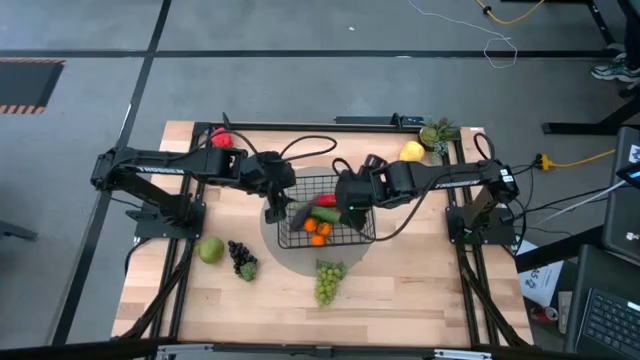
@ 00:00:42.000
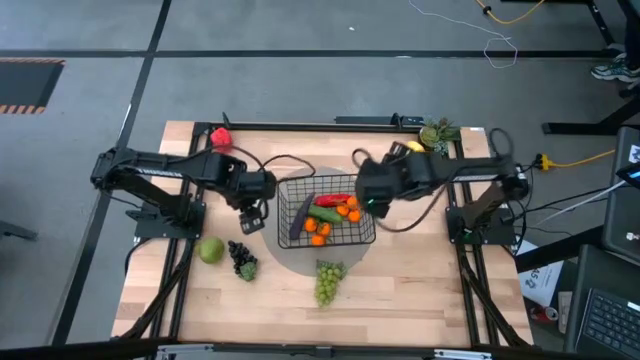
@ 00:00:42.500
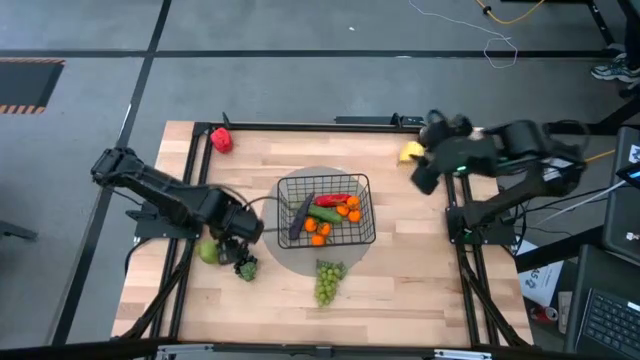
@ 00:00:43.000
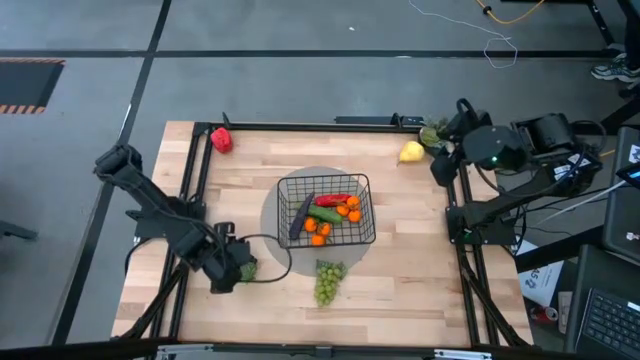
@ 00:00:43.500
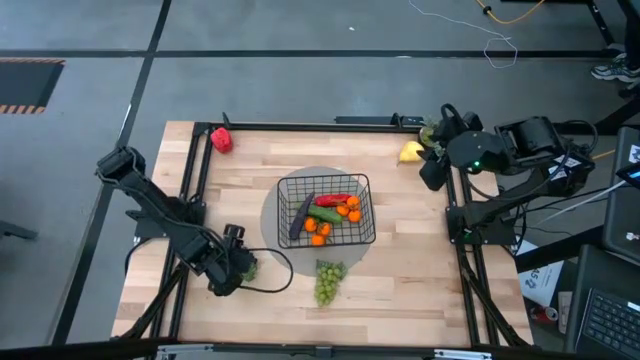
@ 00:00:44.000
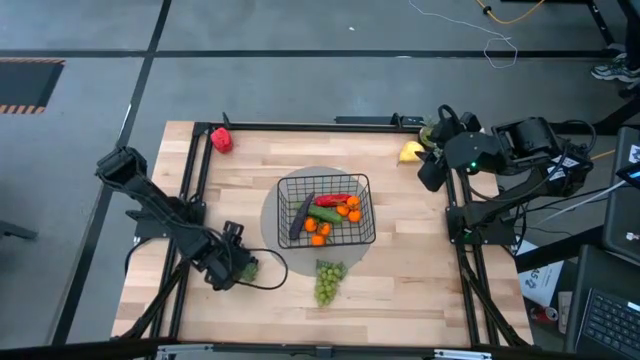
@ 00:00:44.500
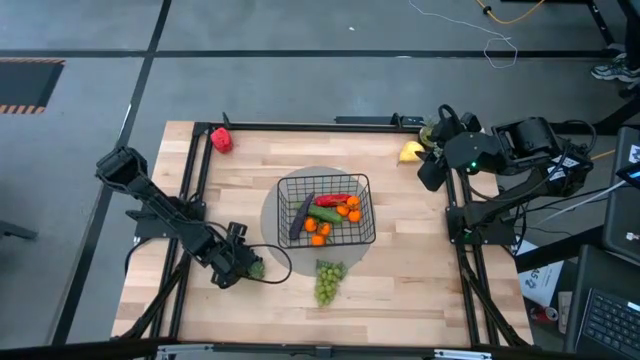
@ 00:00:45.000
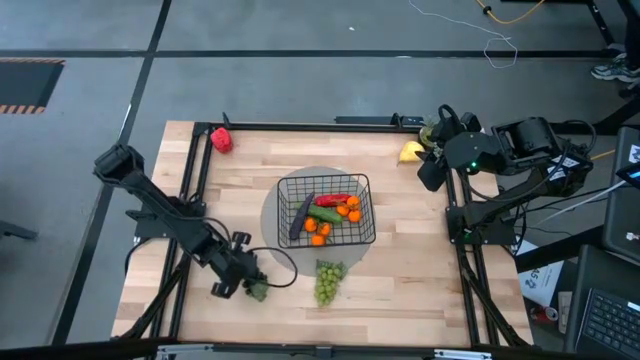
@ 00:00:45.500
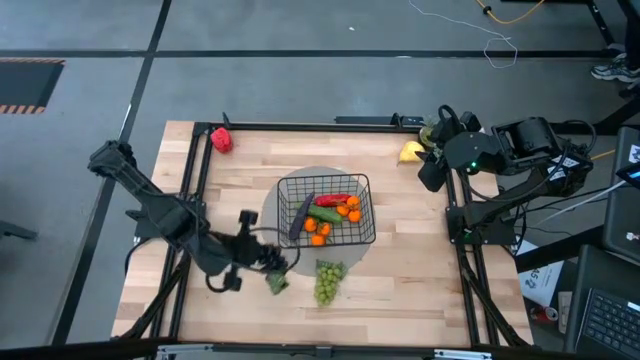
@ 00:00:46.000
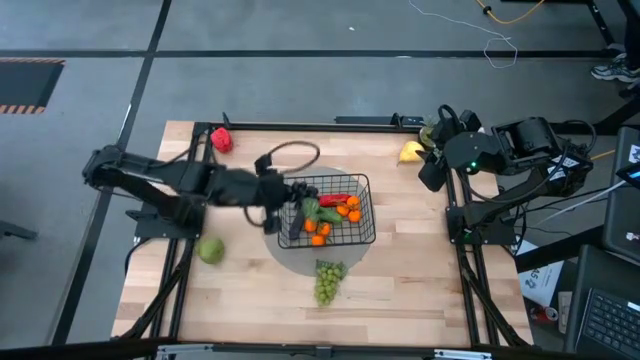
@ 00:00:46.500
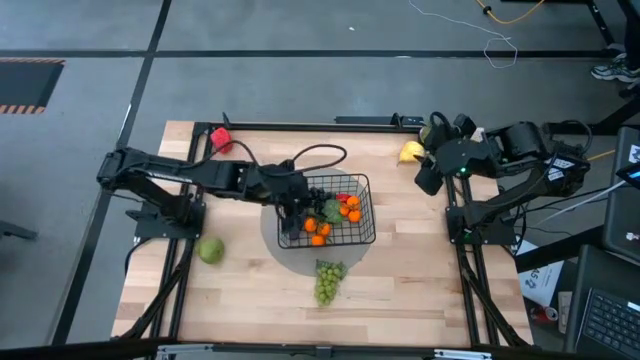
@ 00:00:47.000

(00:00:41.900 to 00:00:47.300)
Task: Build produce basket
Put the black grapes into the wire basket

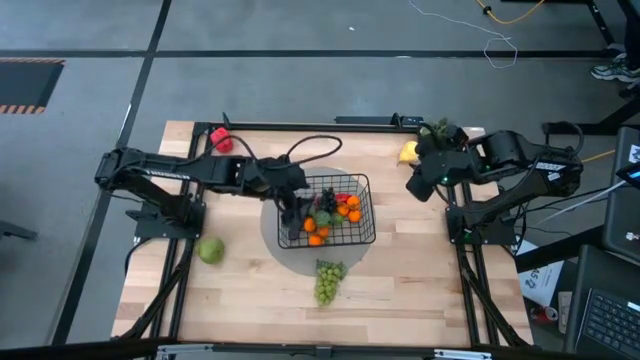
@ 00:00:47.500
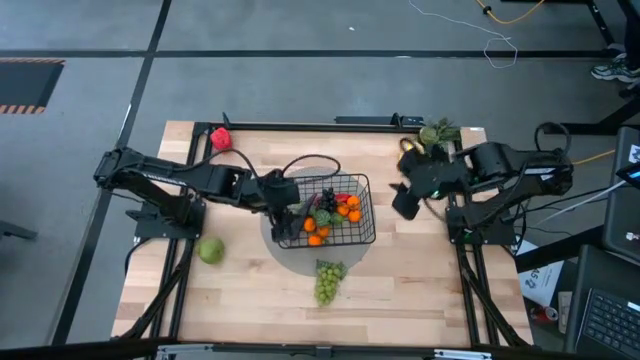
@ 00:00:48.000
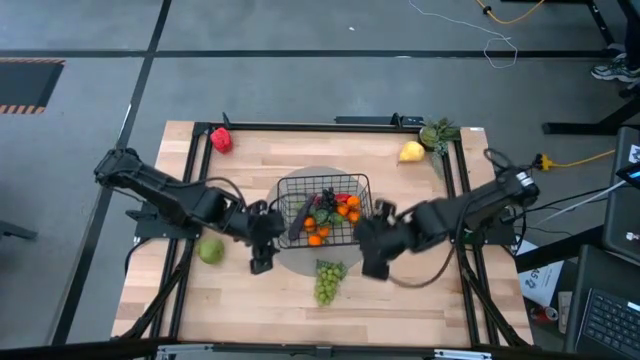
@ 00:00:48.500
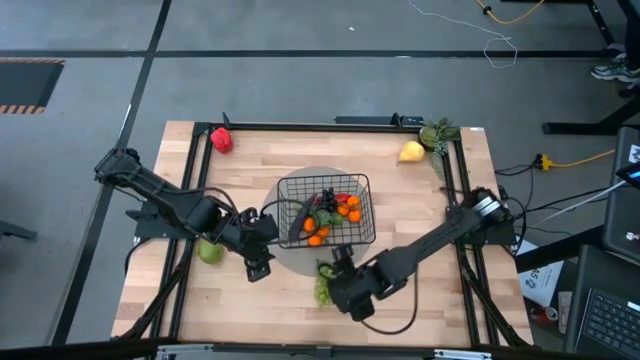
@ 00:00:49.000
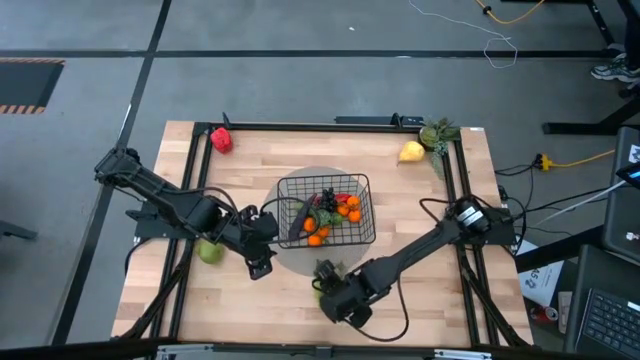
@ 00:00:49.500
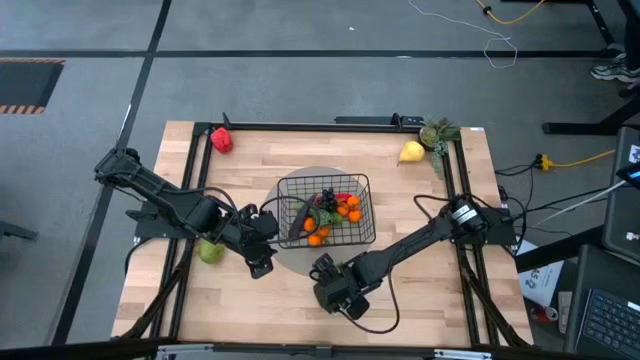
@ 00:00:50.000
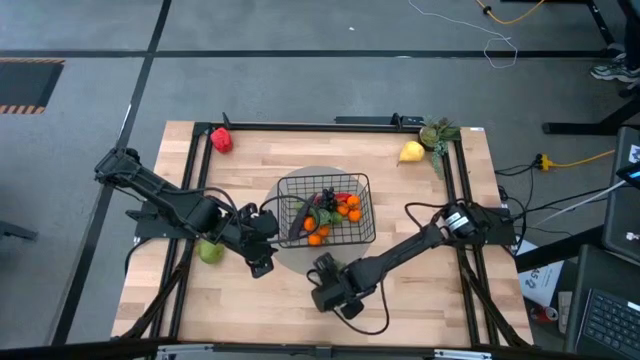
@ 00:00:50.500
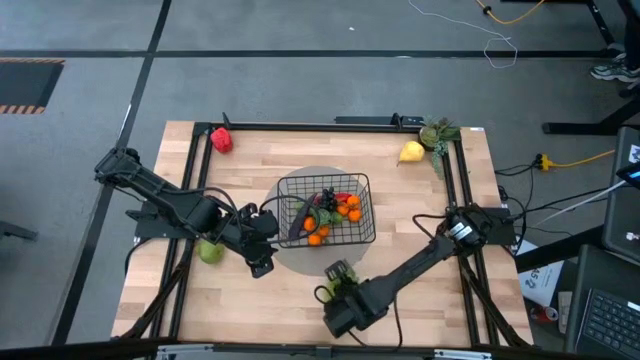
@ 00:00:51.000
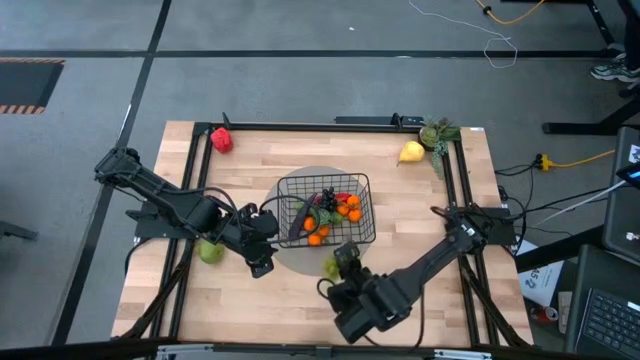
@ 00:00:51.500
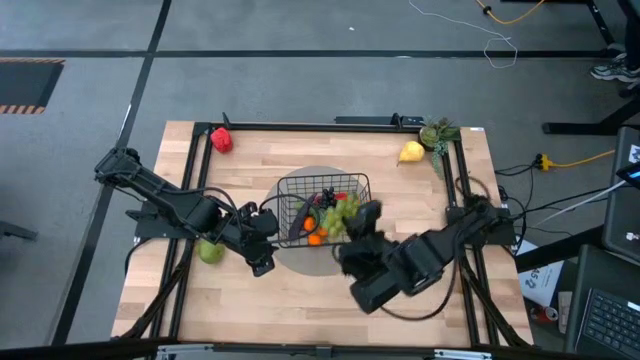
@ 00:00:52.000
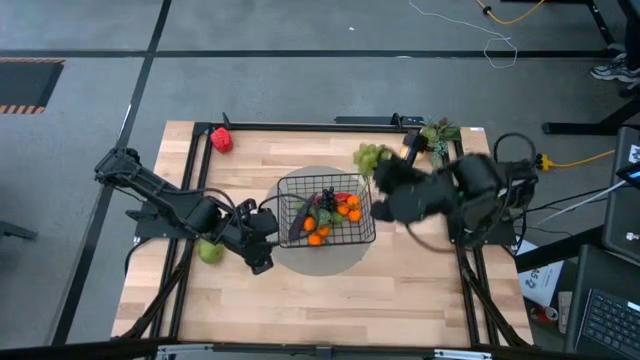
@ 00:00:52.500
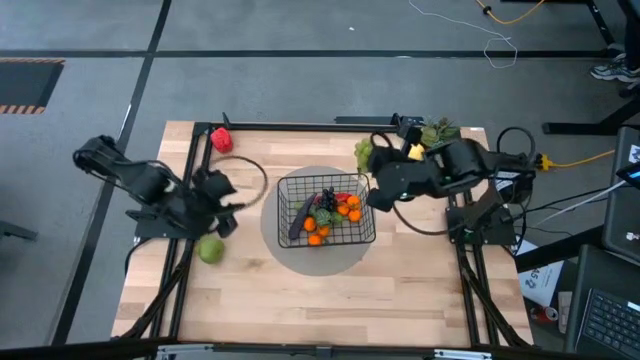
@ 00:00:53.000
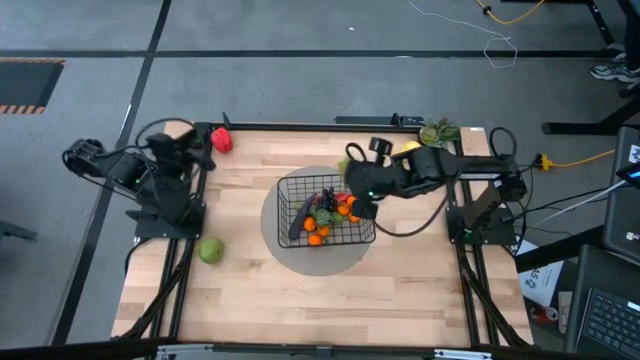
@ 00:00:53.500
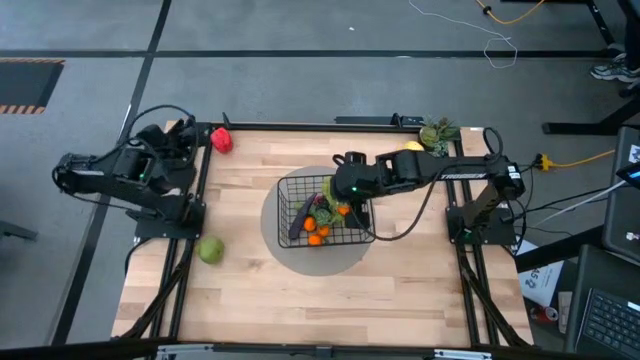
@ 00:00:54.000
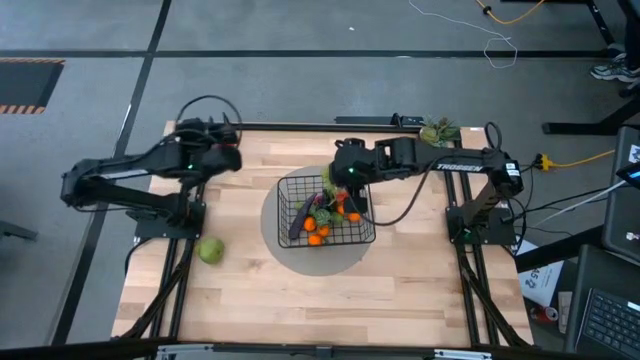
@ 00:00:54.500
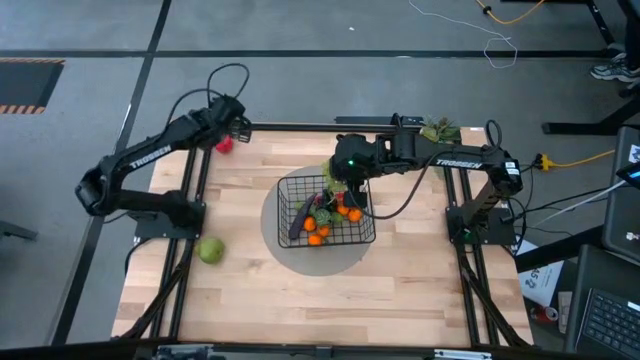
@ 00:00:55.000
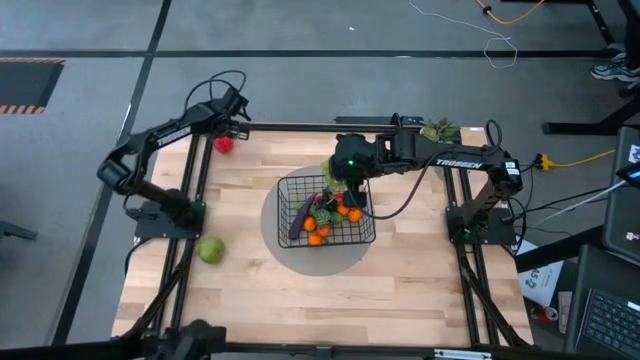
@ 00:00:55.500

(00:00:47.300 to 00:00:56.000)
Put the green grapes into the wire basket

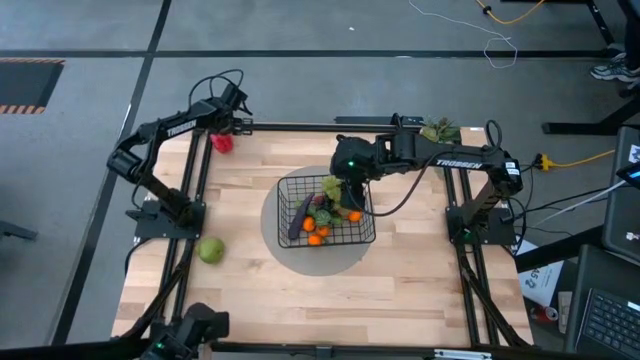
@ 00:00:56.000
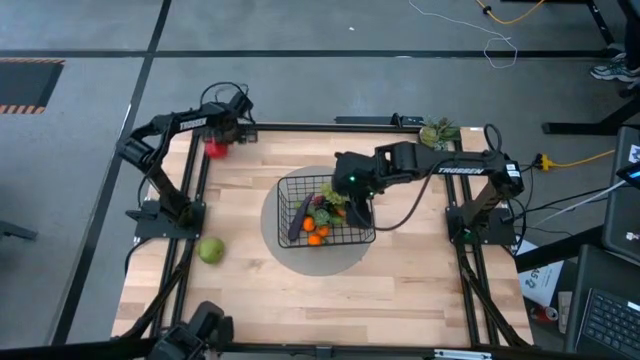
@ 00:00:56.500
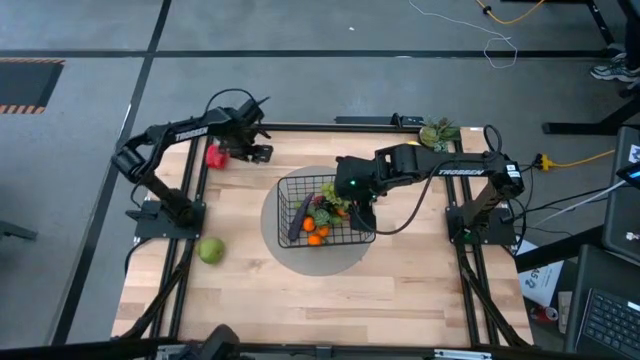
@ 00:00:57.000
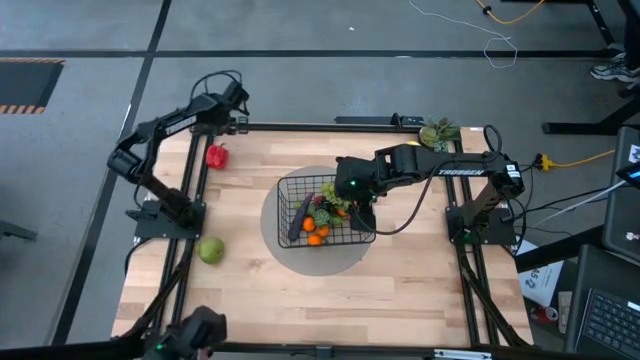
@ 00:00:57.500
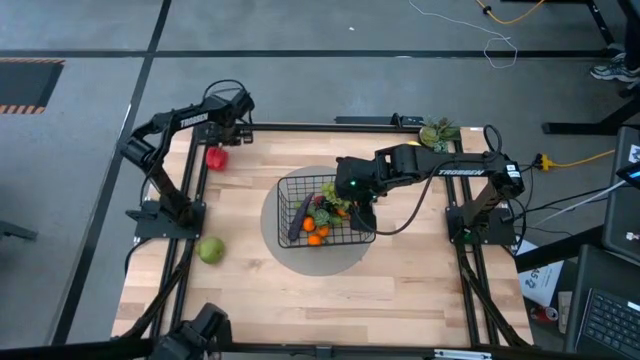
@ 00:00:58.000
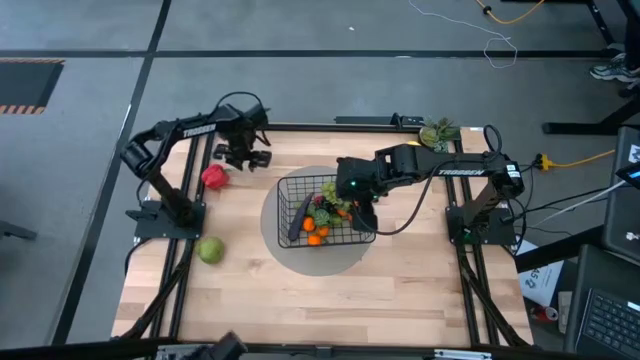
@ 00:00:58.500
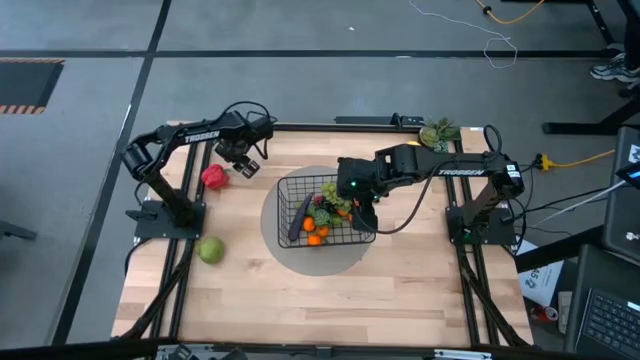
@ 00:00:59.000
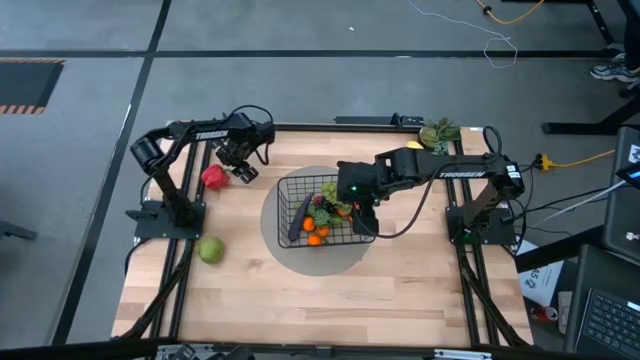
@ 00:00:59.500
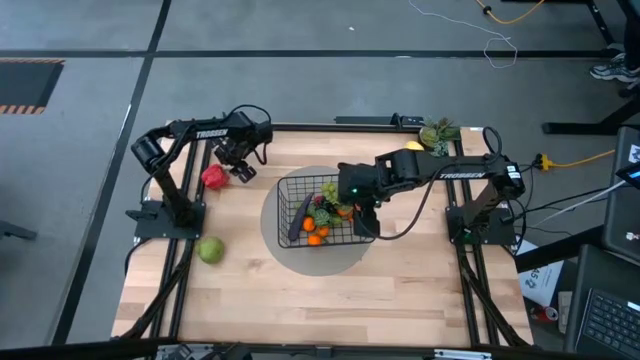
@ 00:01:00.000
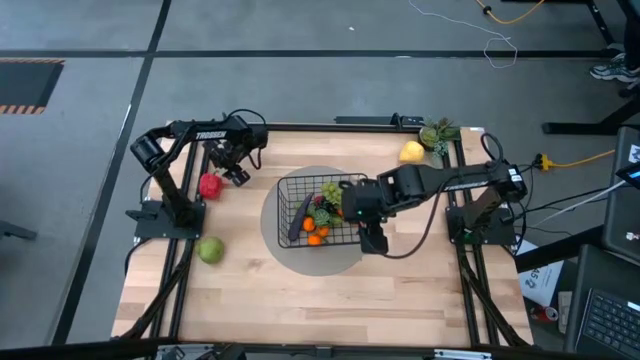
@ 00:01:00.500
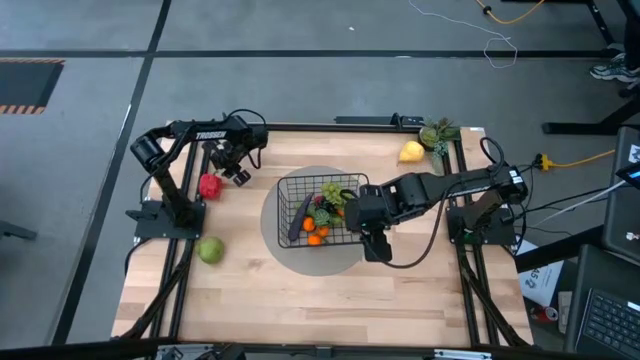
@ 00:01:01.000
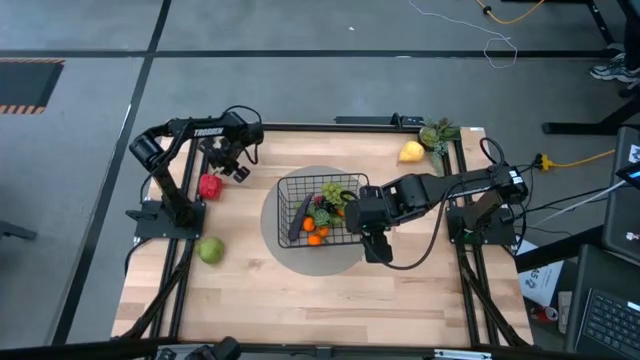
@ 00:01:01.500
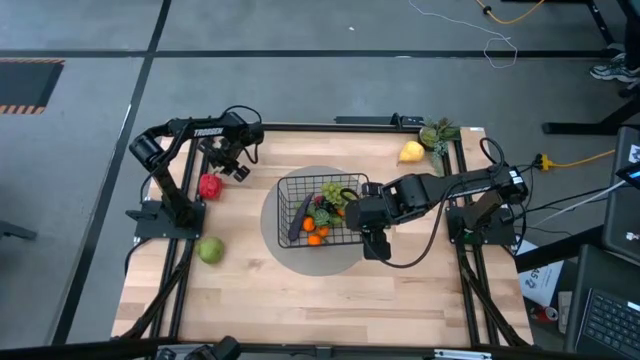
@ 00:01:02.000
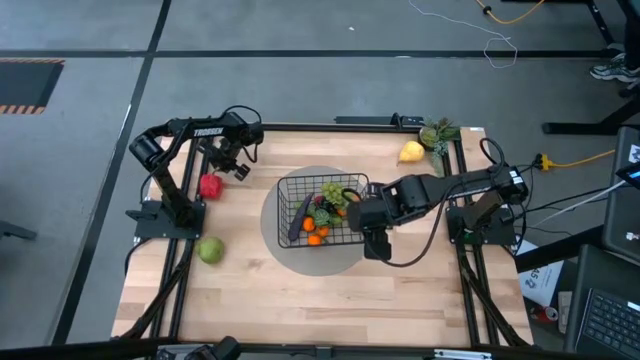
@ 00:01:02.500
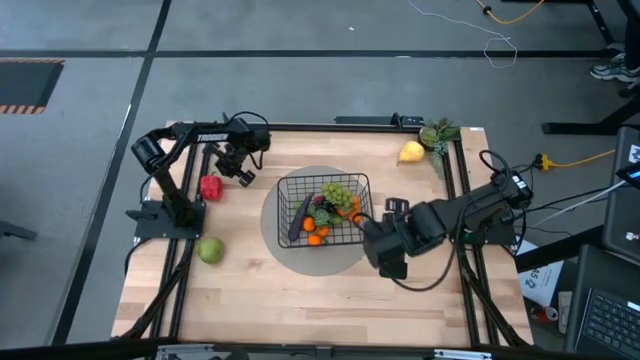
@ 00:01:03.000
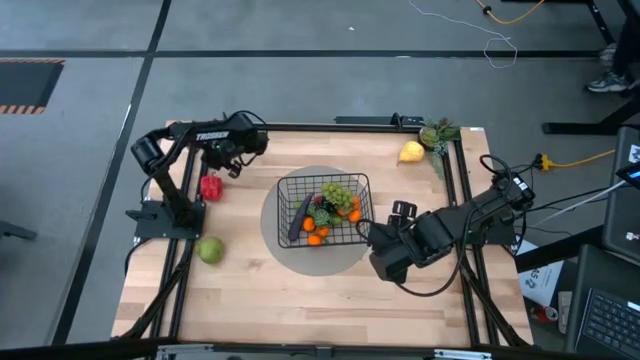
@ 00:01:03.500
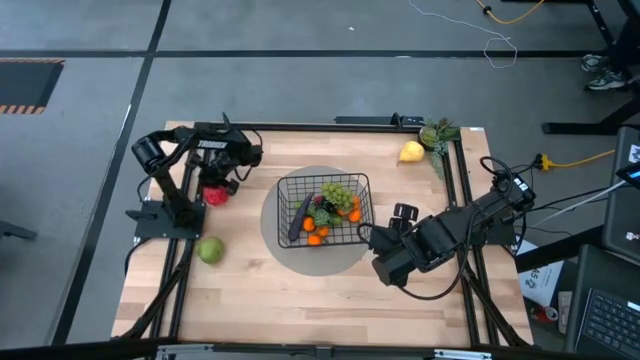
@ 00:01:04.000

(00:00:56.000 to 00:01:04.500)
Move the red bell pepper to the left of the wire basket

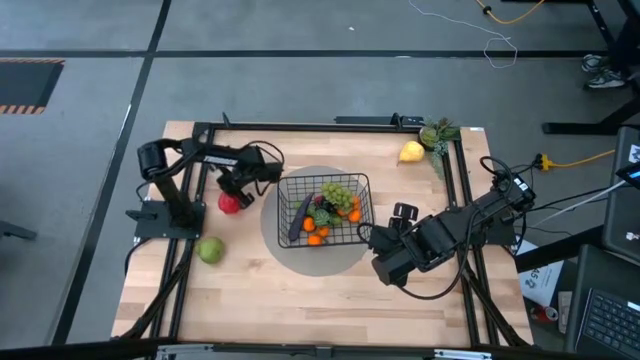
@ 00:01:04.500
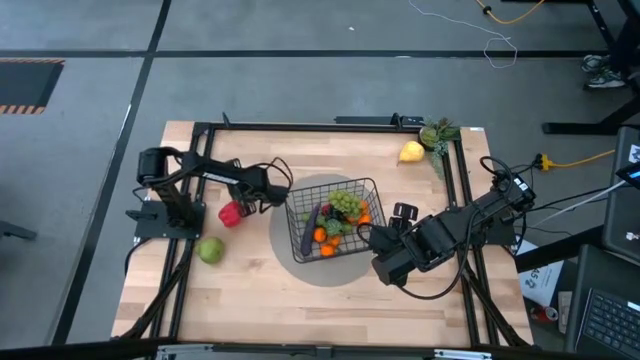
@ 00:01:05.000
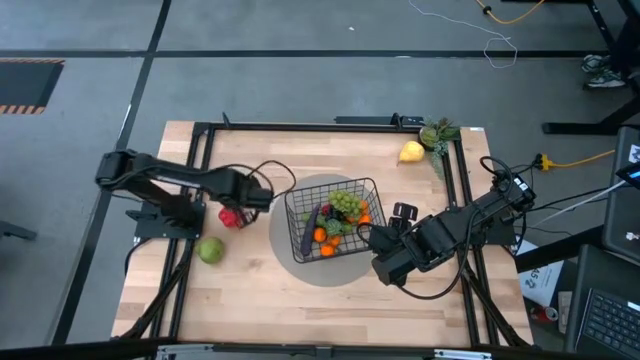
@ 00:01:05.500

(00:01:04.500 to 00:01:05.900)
Move the red bell pepper to the left of the wire basket
